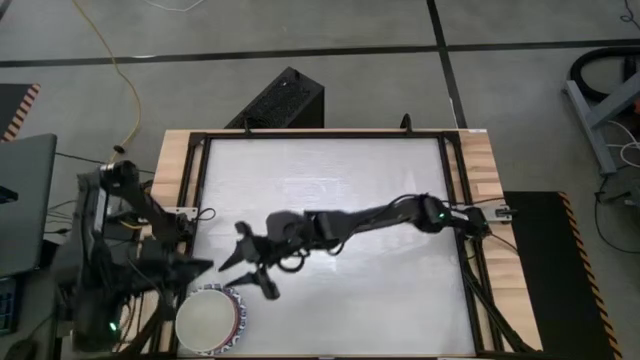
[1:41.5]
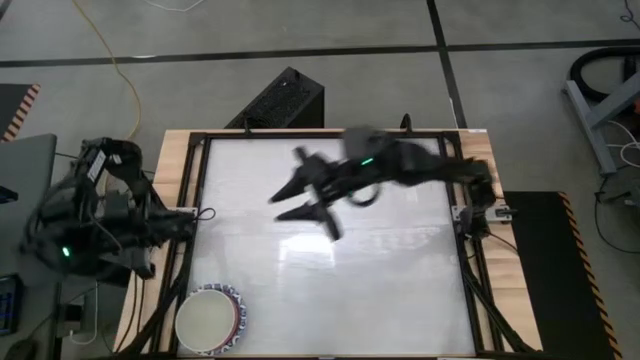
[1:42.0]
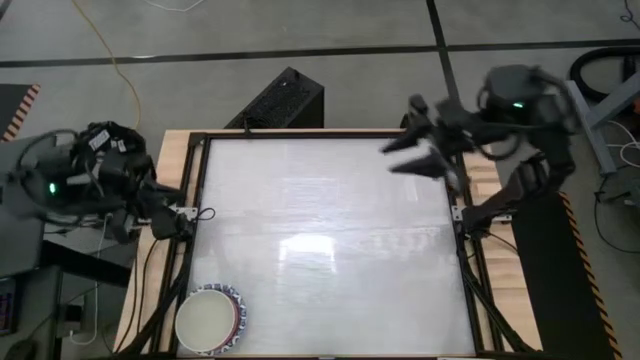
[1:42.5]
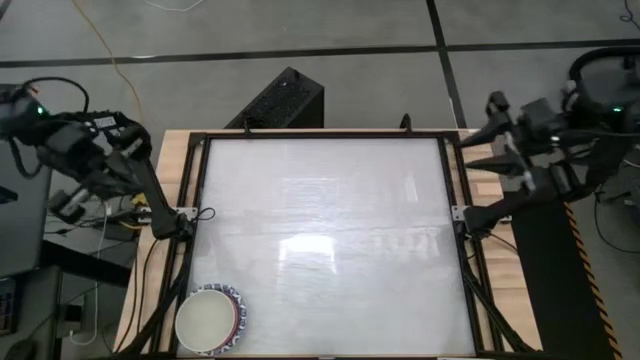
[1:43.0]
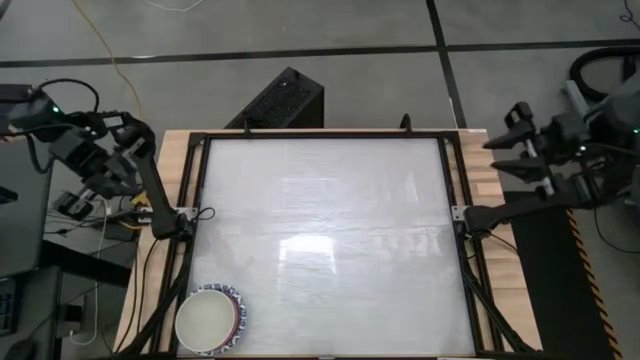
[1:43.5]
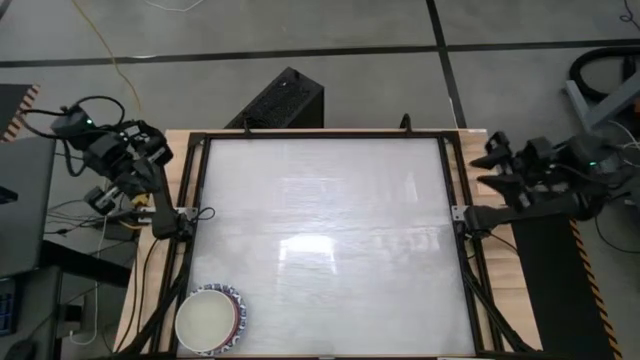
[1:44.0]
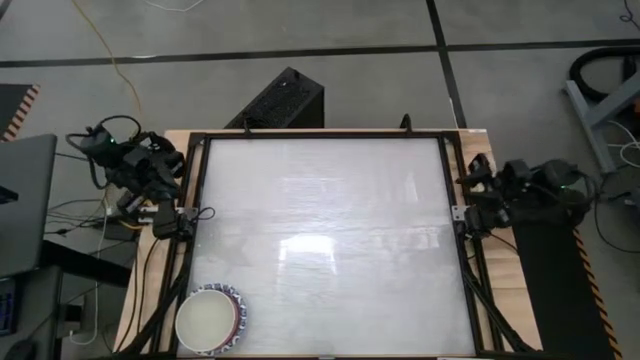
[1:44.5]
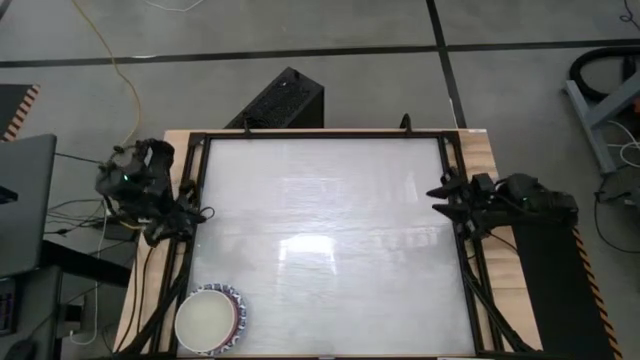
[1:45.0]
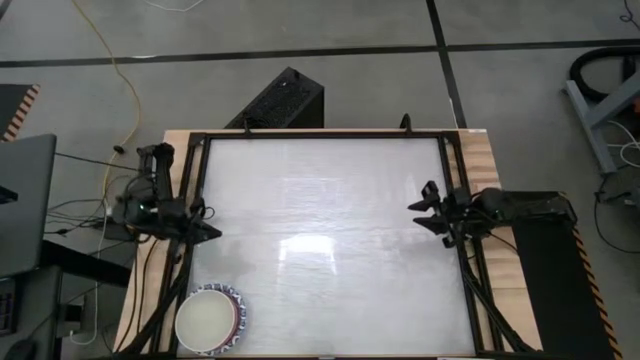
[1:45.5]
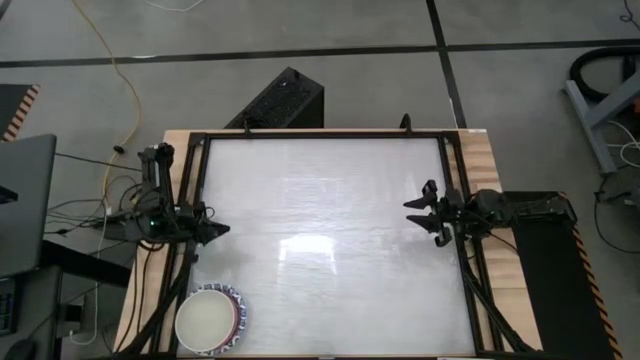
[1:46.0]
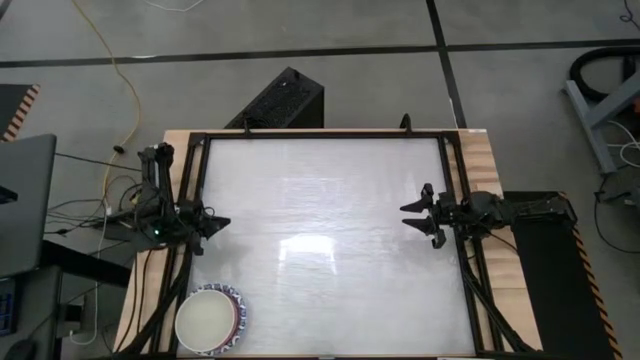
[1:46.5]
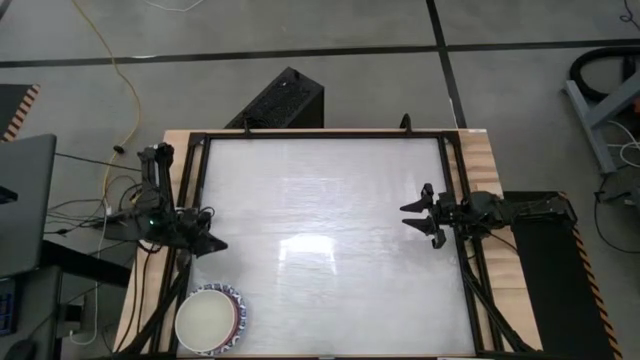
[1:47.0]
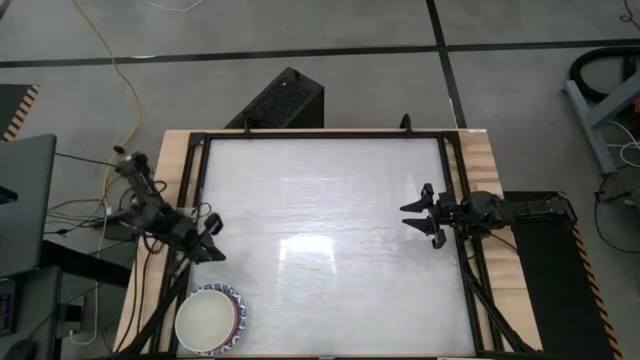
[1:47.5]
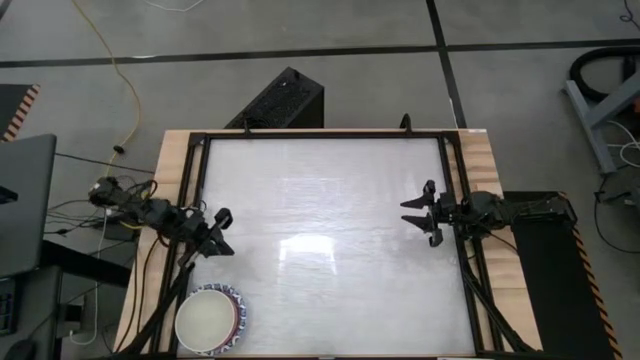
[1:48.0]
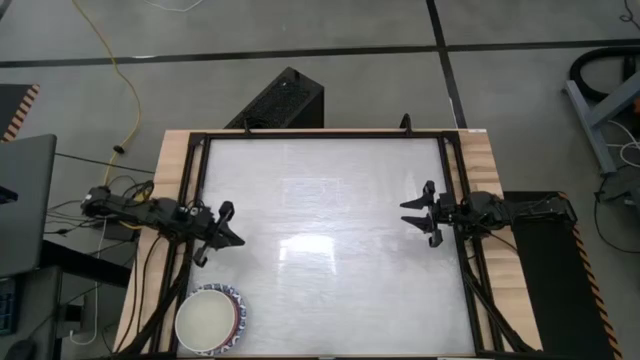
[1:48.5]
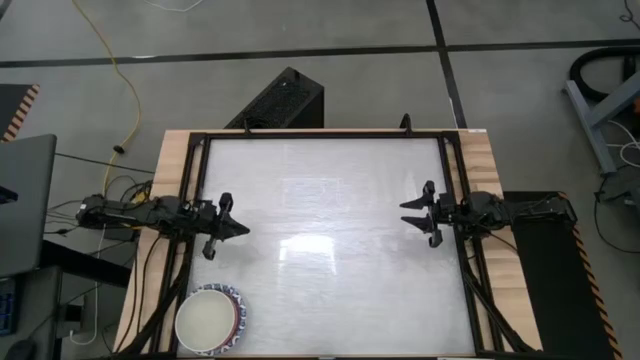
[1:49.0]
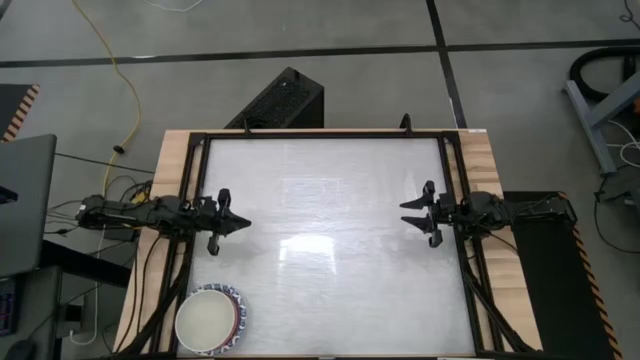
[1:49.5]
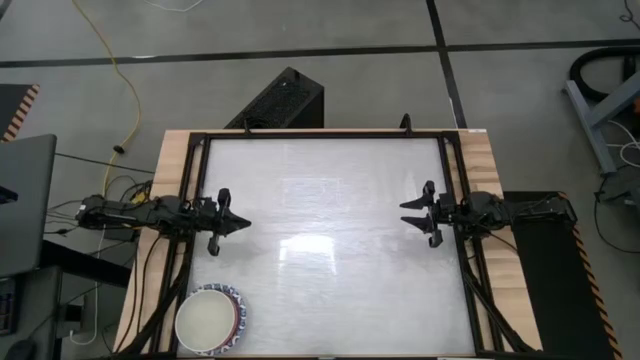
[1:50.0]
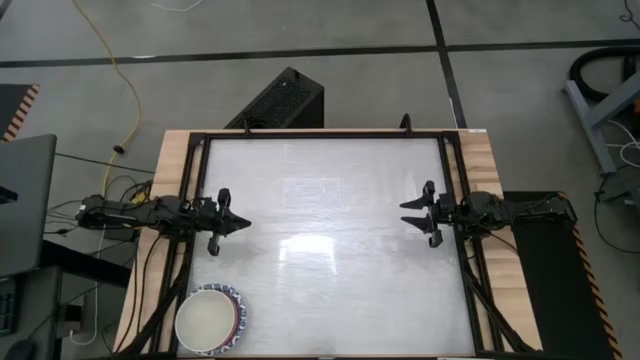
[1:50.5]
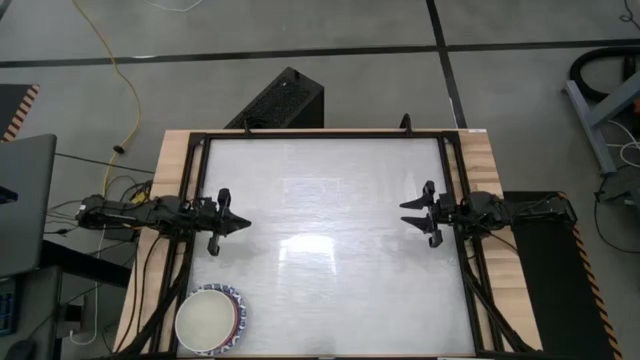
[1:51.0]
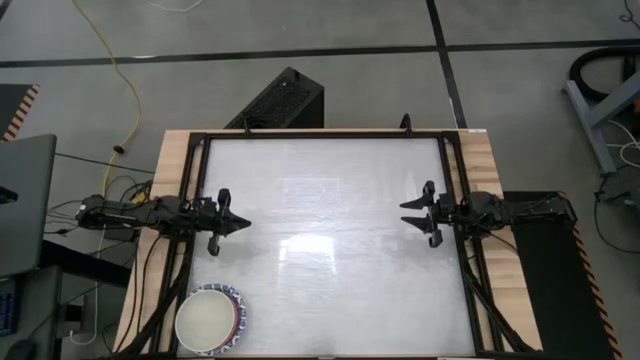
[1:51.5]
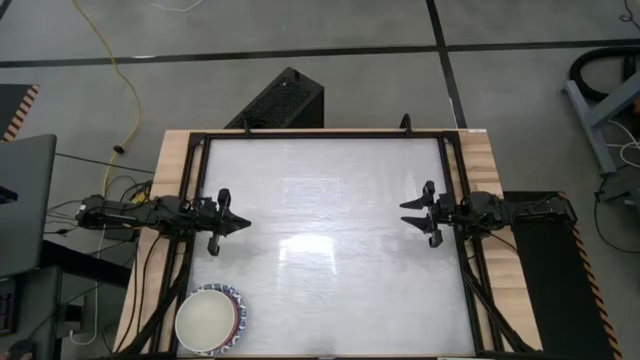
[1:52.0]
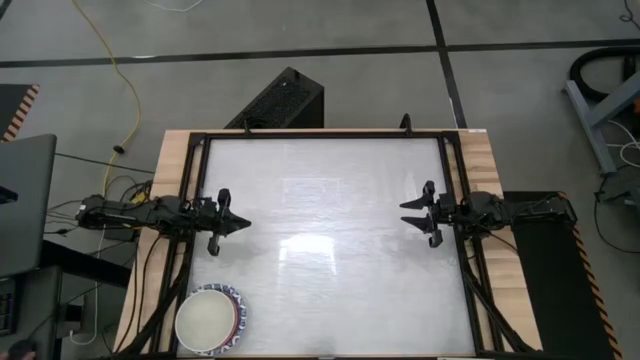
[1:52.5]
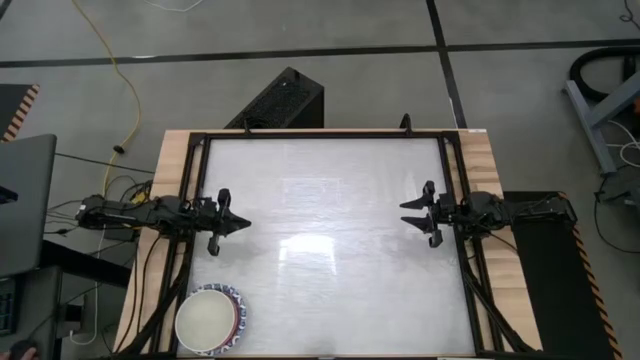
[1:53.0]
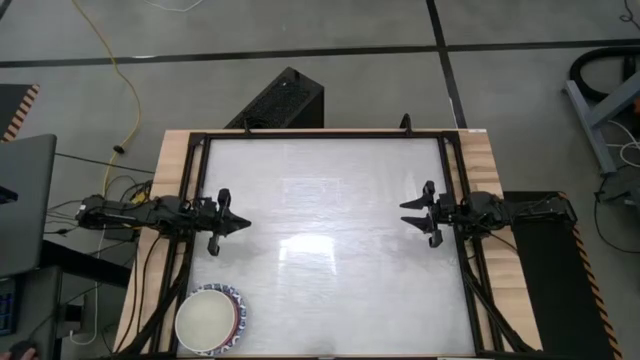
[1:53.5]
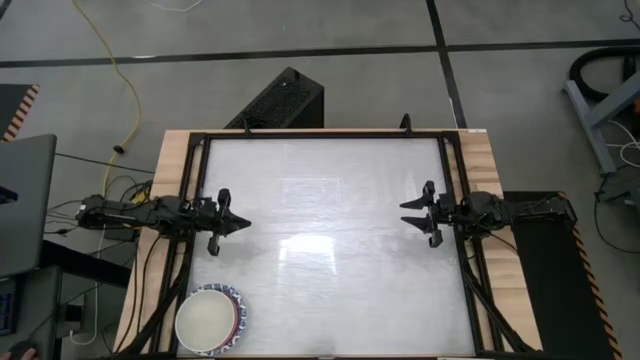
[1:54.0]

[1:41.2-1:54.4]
Task: Nest bowls inside each other by size order
Return to Home Position

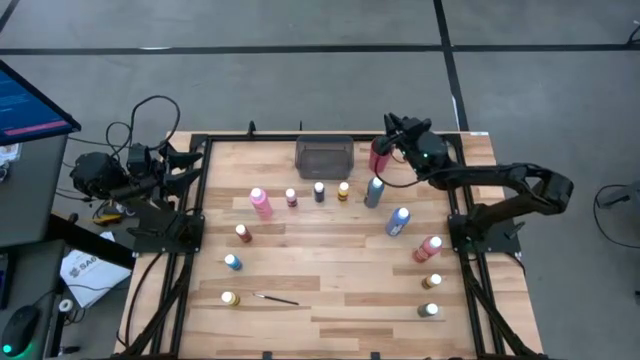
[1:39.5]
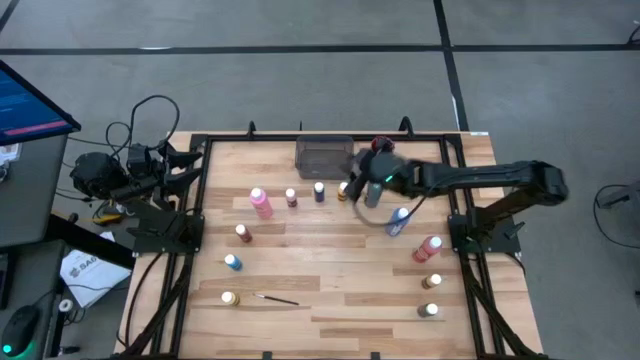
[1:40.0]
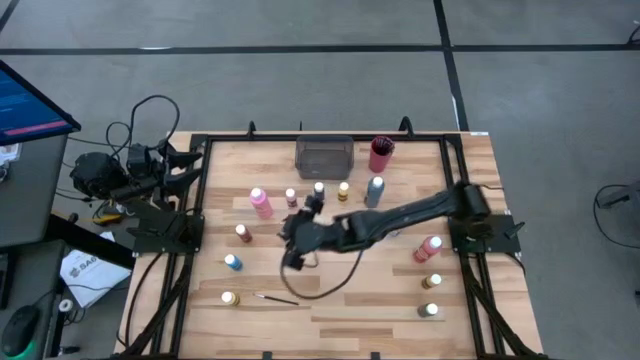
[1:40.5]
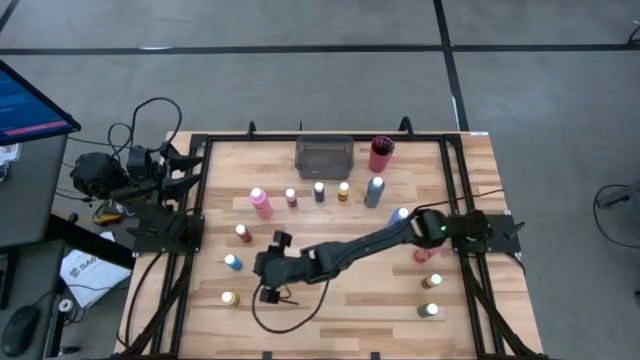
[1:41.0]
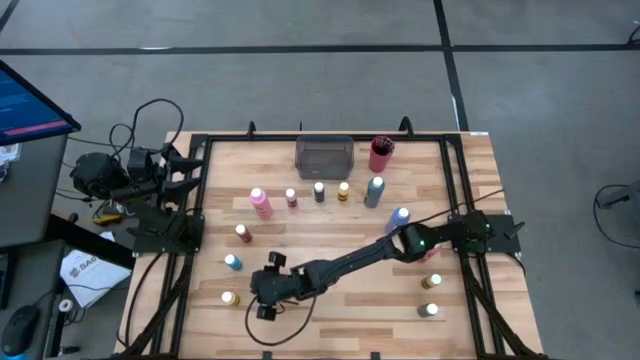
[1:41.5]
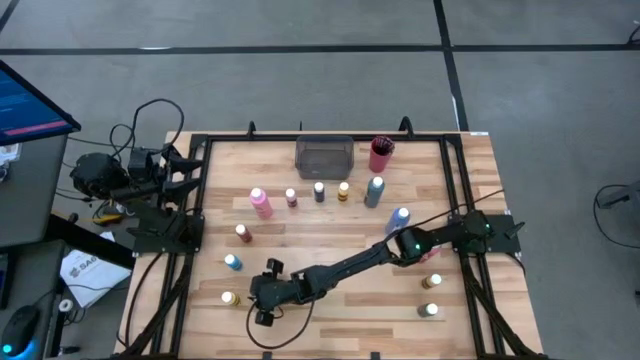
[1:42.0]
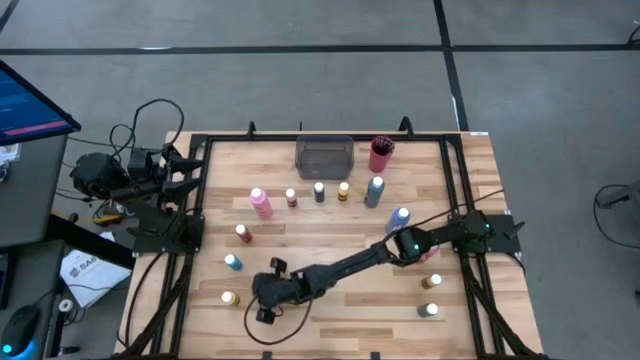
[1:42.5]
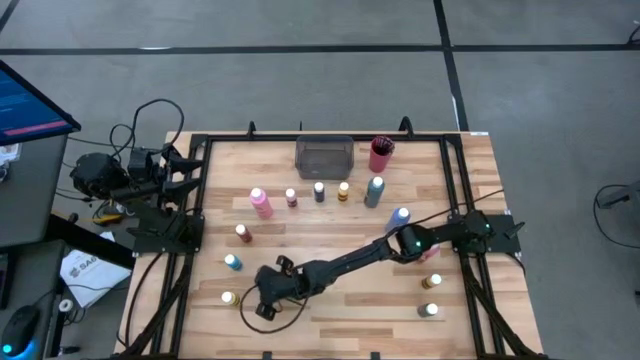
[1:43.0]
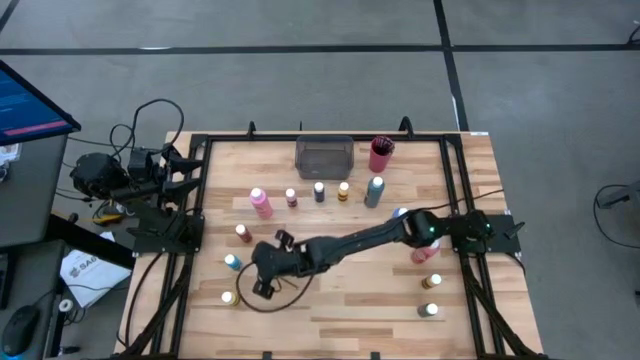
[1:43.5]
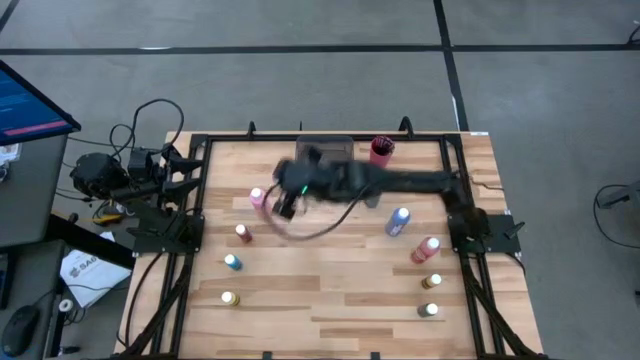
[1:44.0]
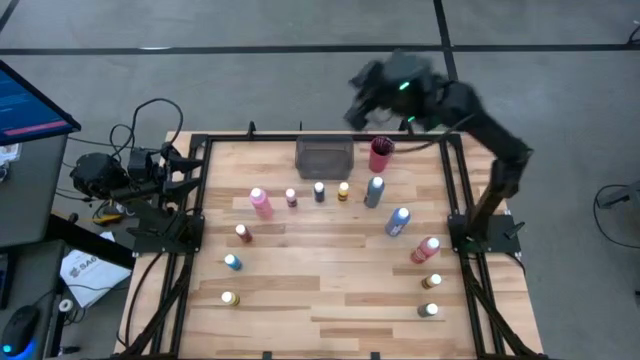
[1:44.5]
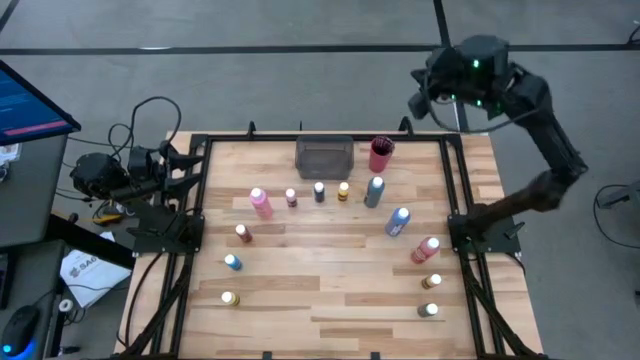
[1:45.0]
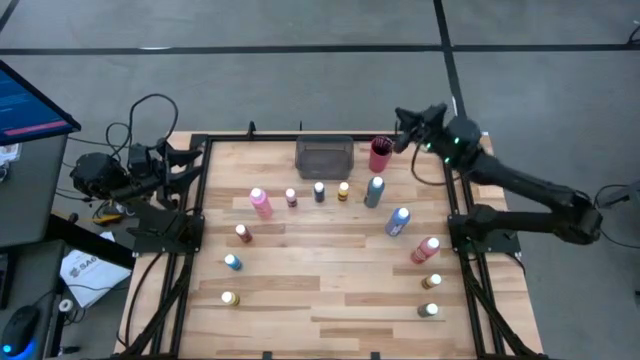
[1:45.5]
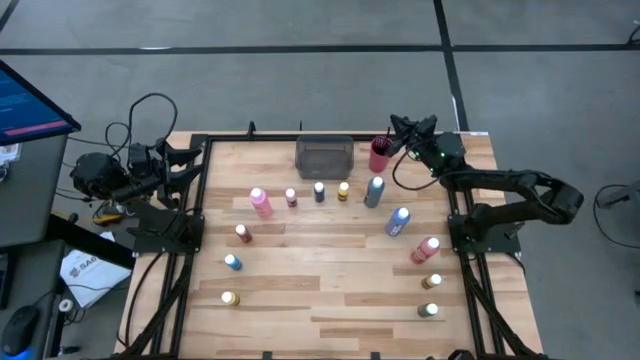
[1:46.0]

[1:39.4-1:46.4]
Task: Pick & Place Paint Supplies
Put the black paintbrush into the red cup
